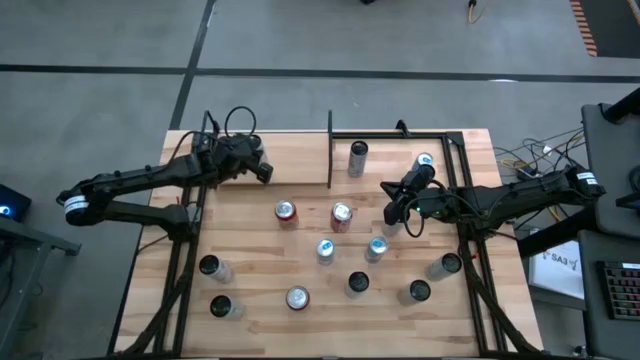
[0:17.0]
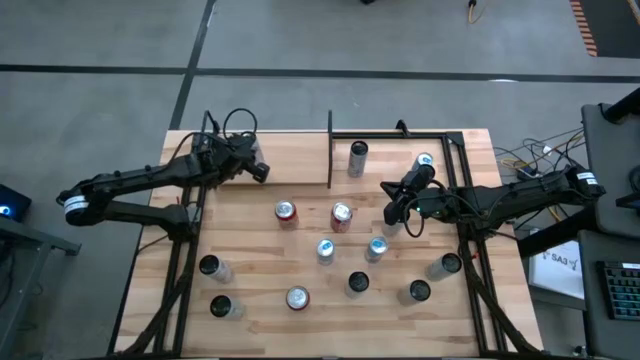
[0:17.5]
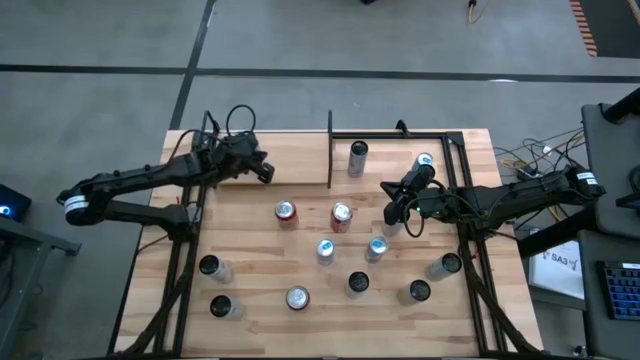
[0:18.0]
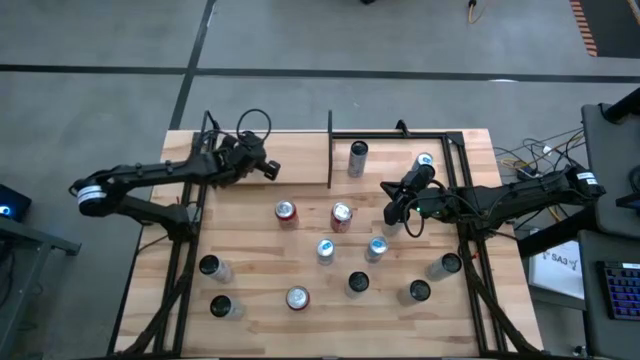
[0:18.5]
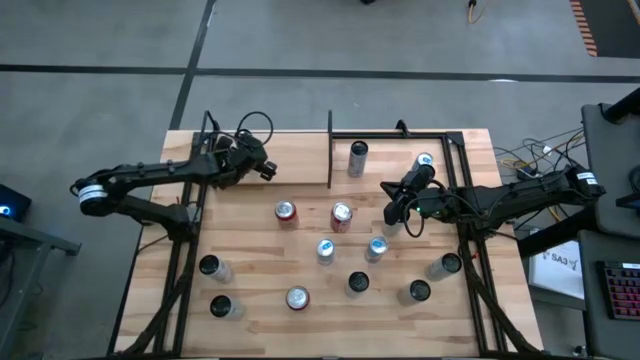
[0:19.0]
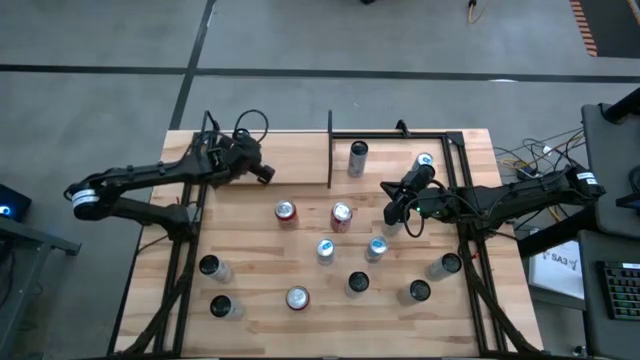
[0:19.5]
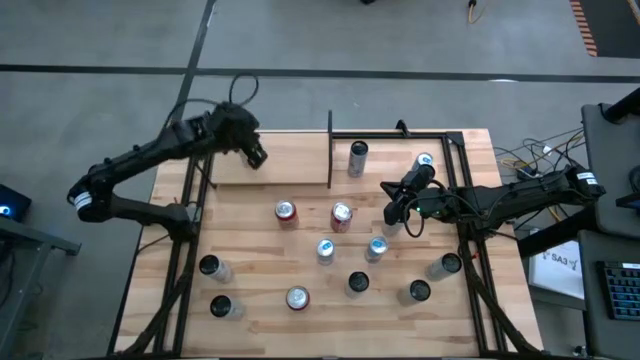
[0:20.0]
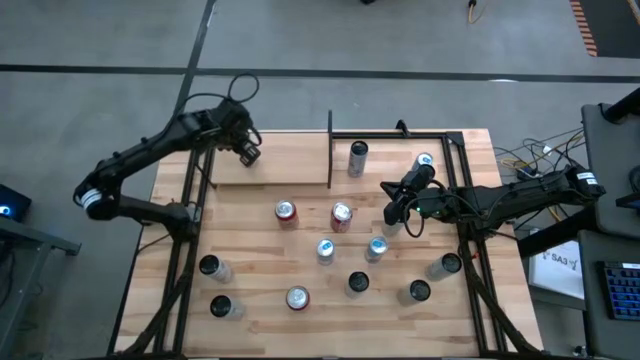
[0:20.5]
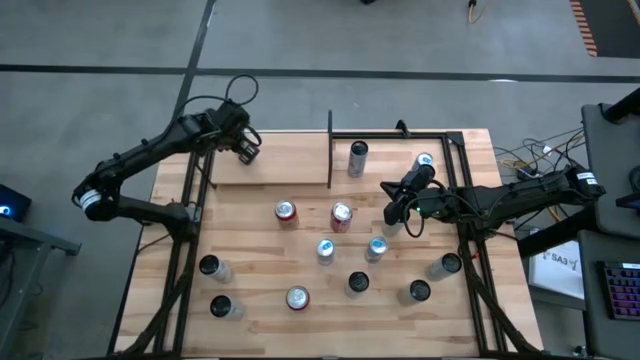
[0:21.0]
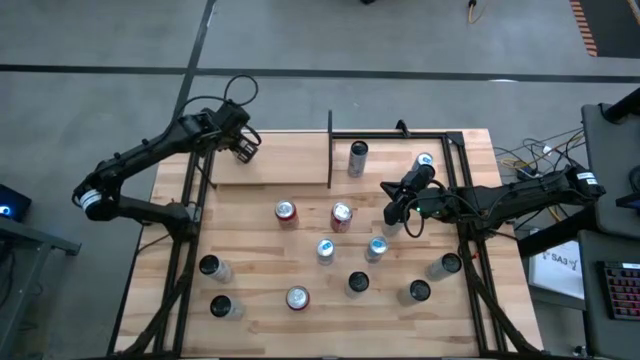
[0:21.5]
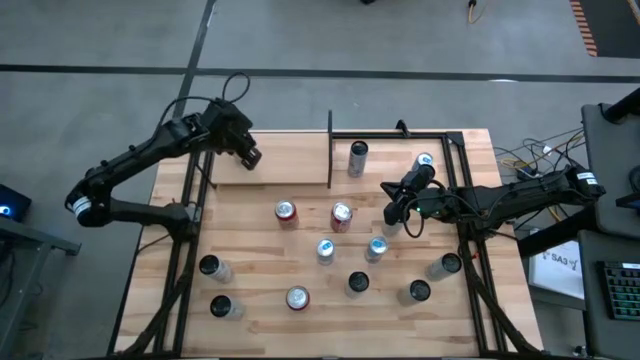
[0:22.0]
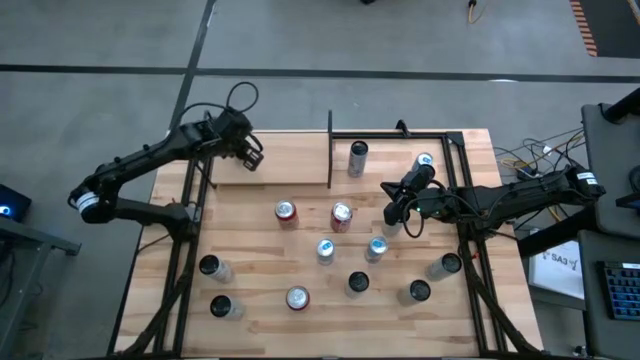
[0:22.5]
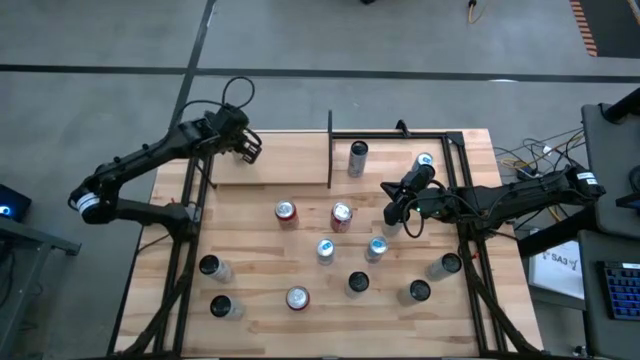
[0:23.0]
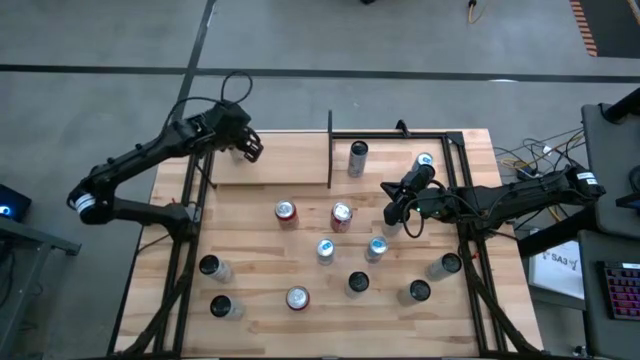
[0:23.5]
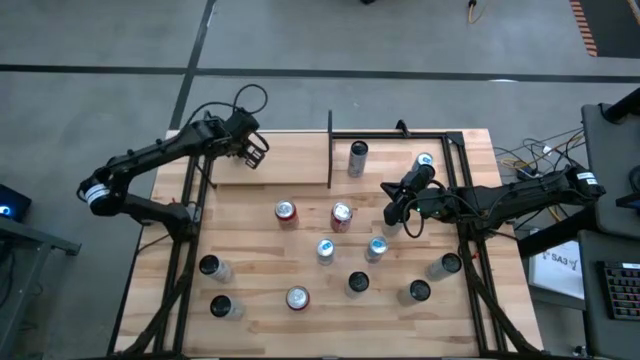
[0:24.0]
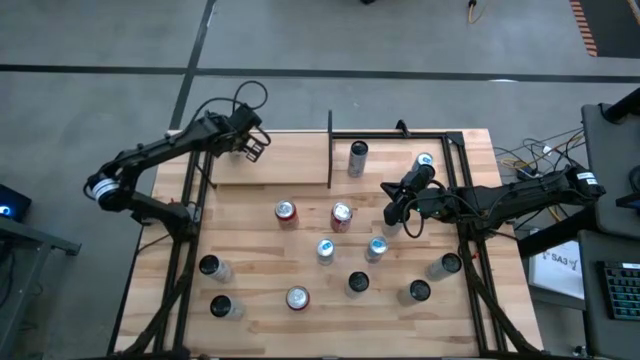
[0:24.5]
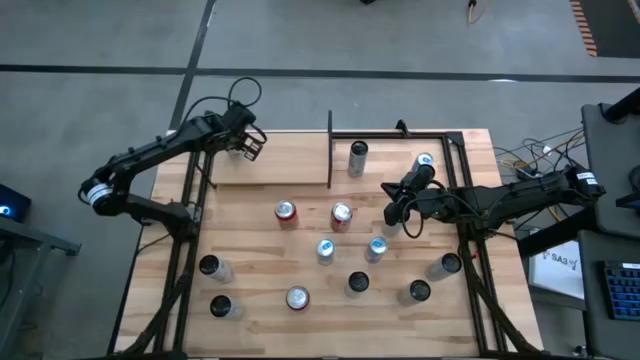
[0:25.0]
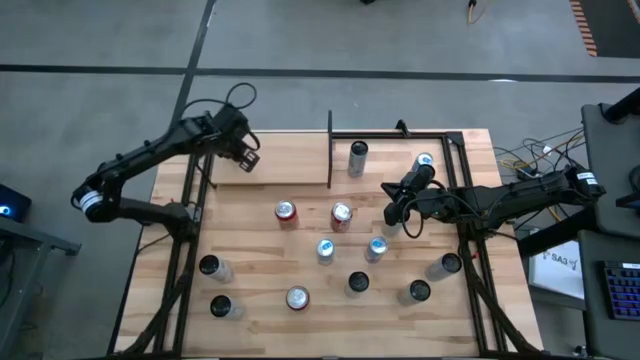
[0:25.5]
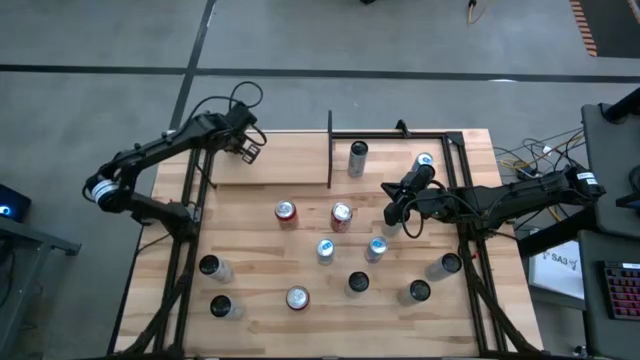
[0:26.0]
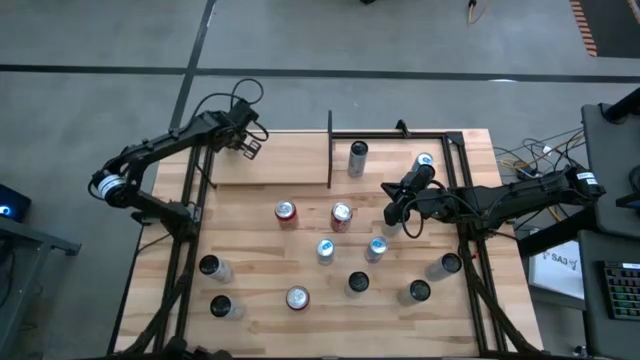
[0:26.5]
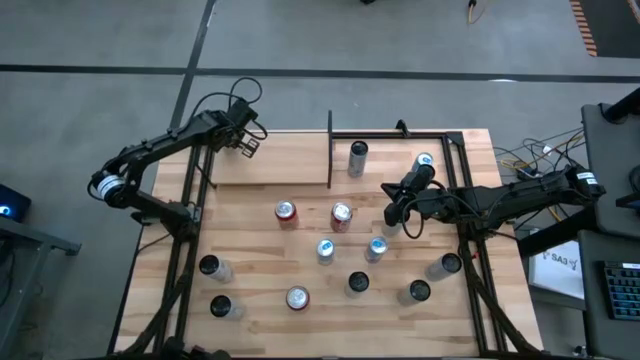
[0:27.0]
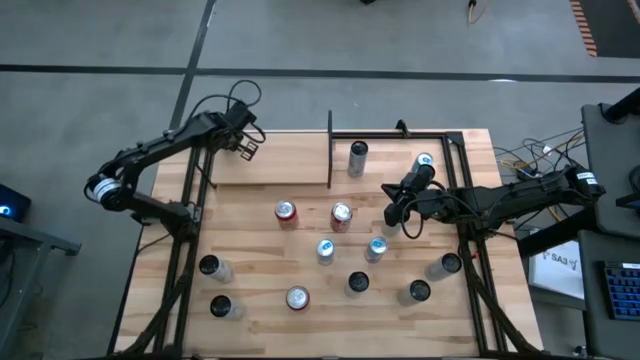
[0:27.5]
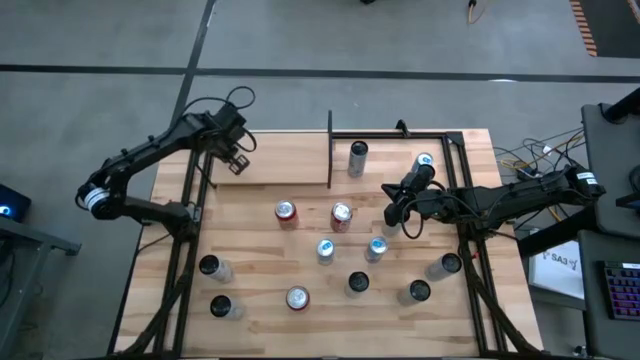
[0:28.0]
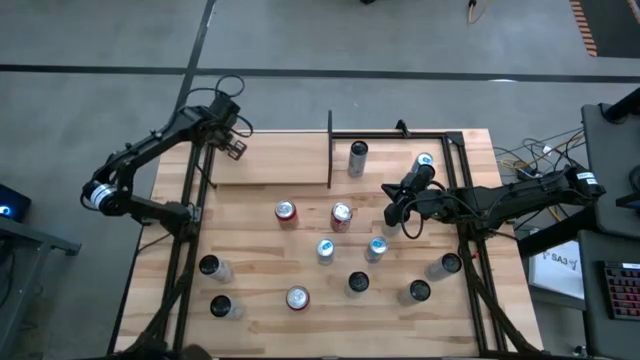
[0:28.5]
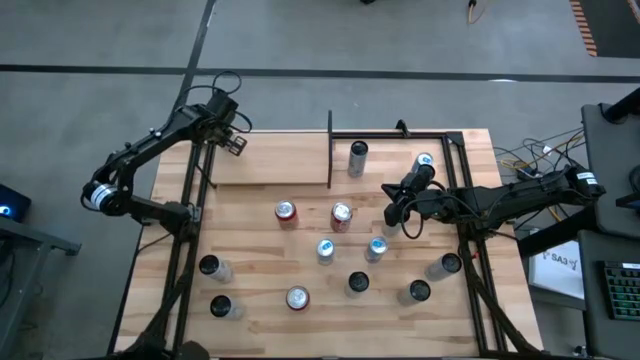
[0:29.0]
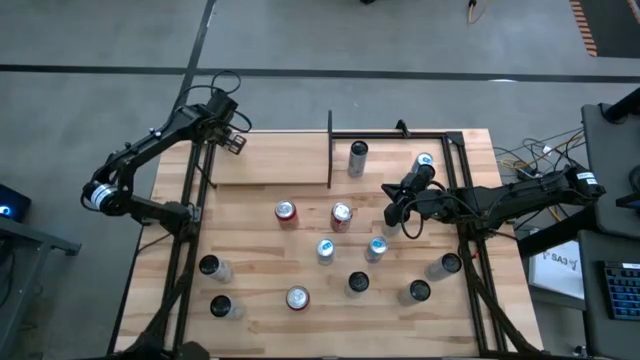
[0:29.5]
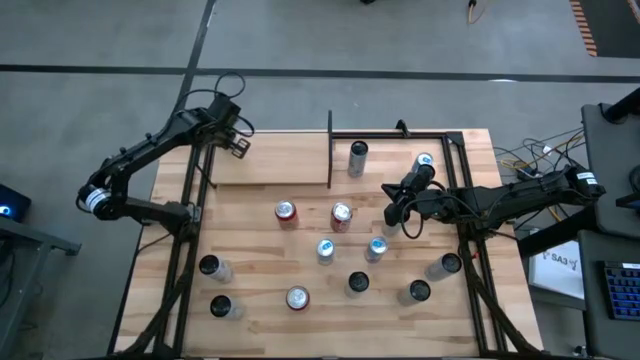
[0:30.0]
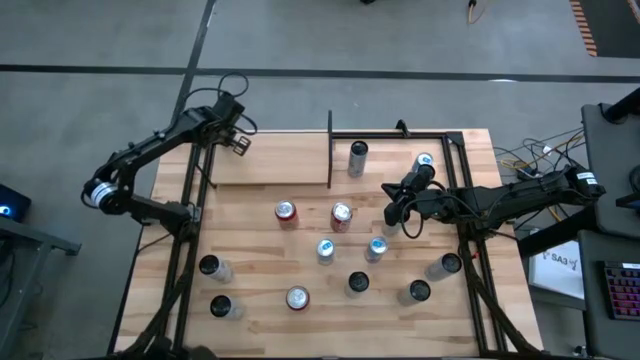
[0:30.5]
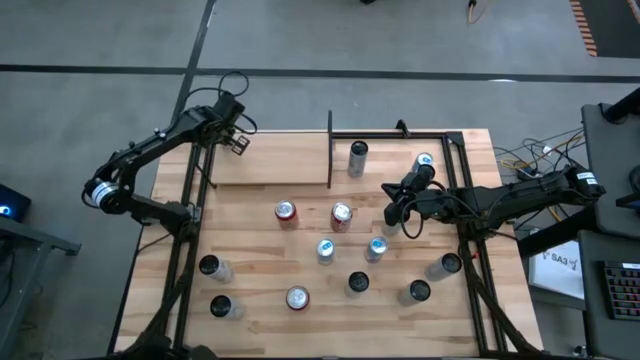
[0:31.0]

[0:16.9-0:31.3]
Task: Place canned beverage on shelf
Put the top right white and pink soda can on the shelf

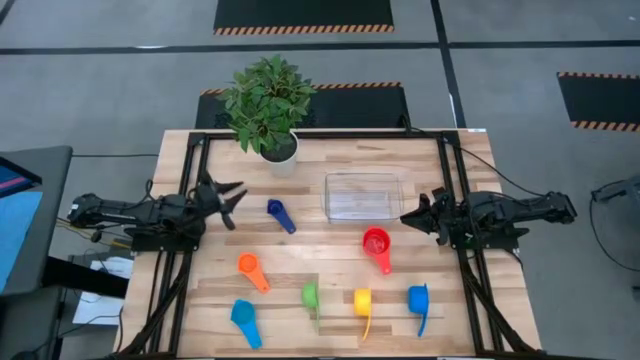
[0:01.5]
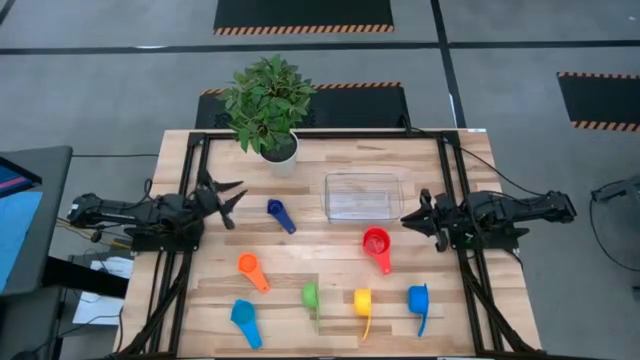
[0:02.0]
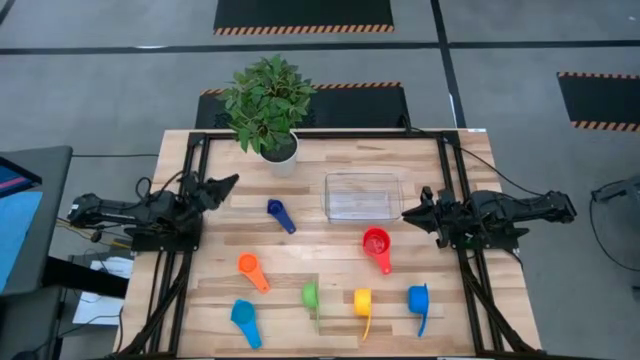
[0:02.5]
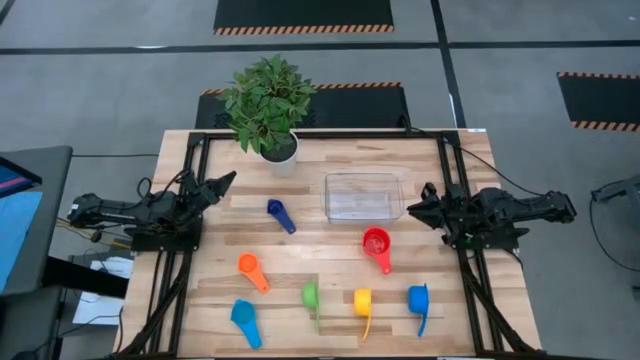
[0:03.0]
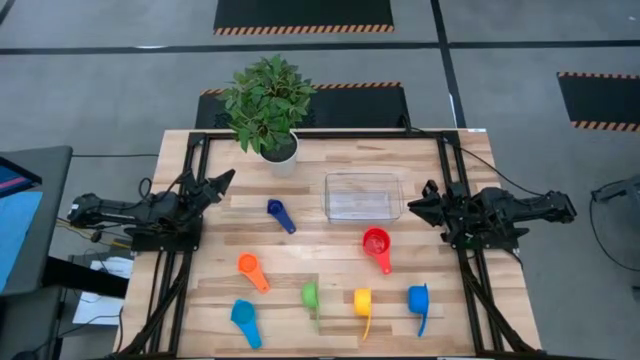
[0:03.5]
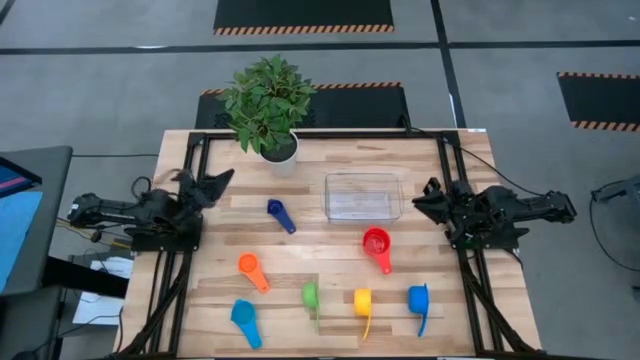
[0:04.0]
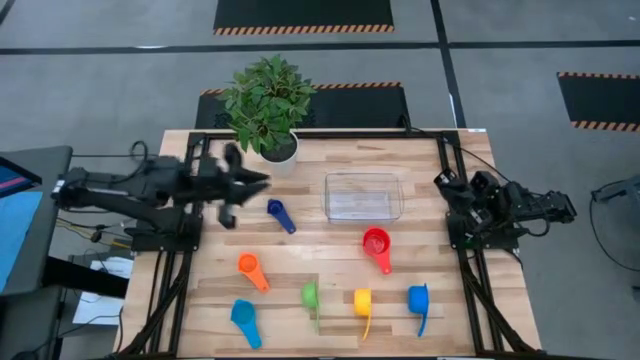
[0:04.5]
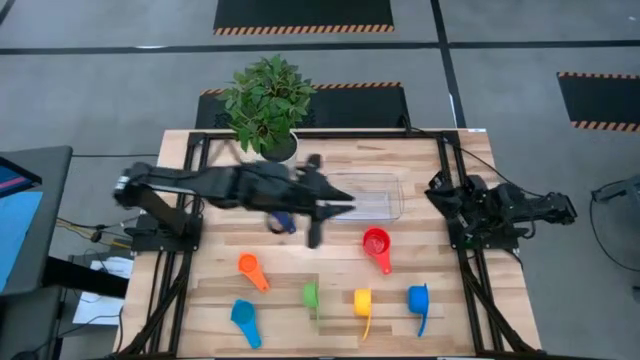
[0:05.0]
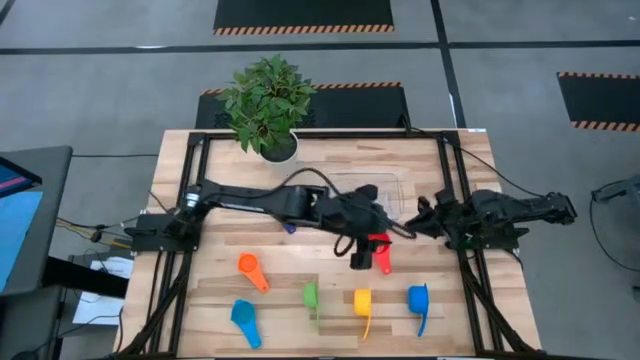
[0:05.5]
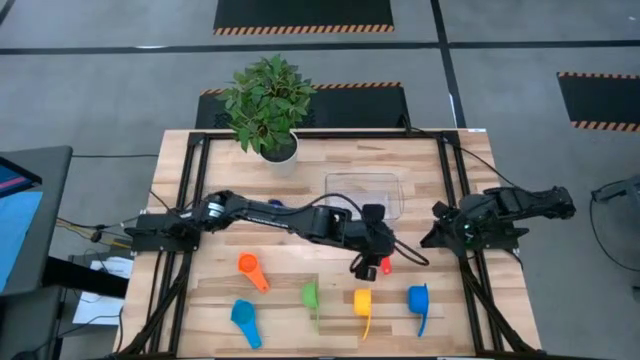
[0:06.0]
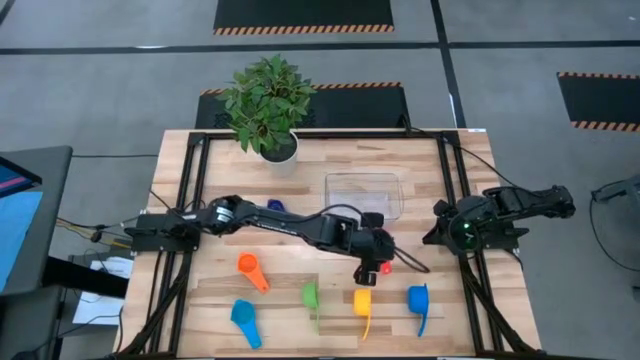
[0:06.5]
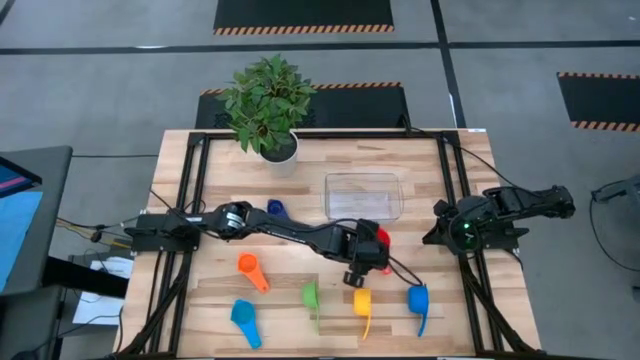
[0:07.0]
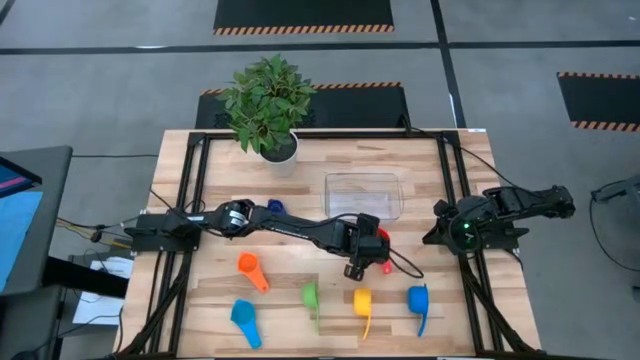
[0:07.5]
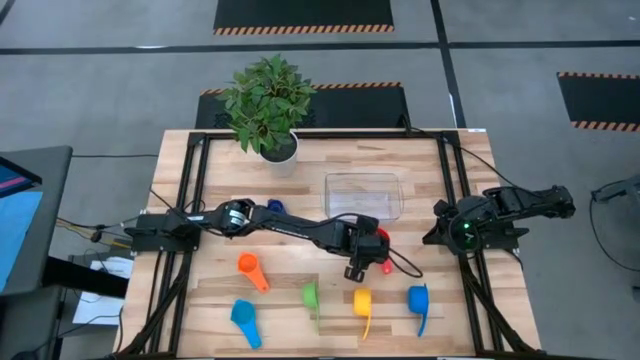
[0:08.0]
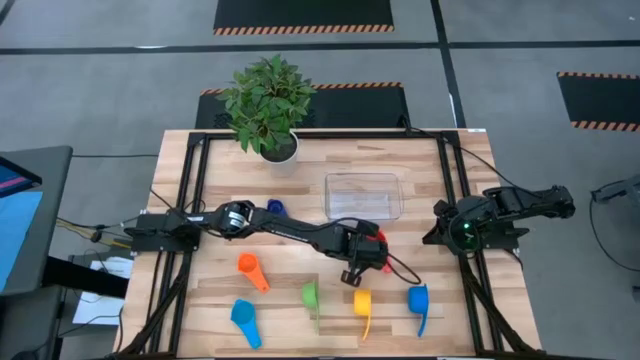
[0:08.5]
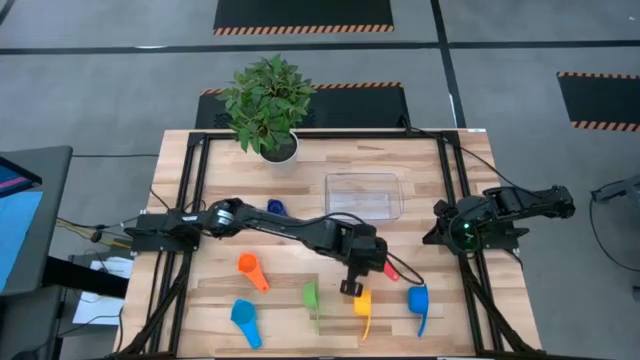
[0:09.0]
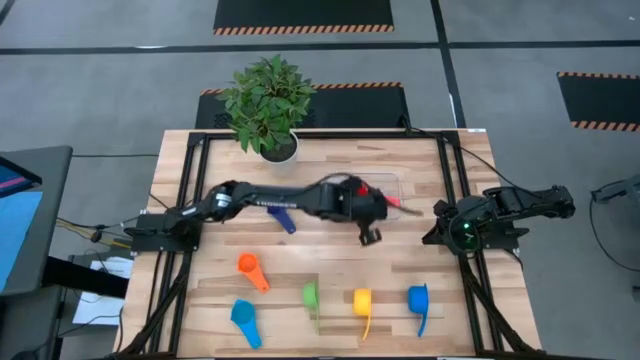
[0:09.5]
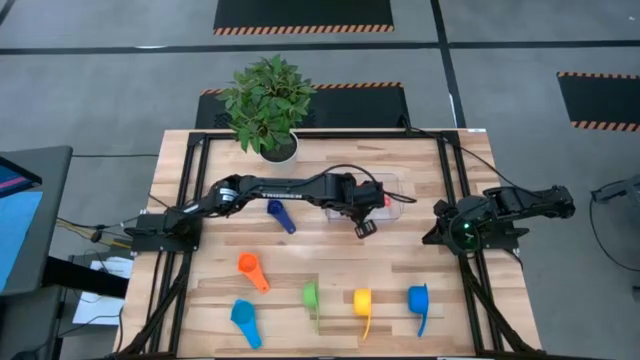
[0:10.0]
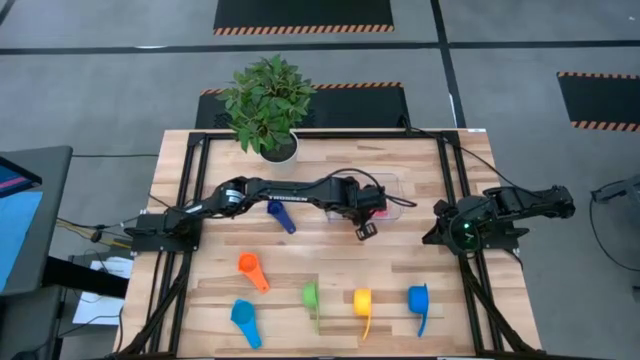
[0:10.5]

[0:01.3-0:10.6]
Task: Nest measuring cups in basket
Put the red measuring cup into the transparent bin
